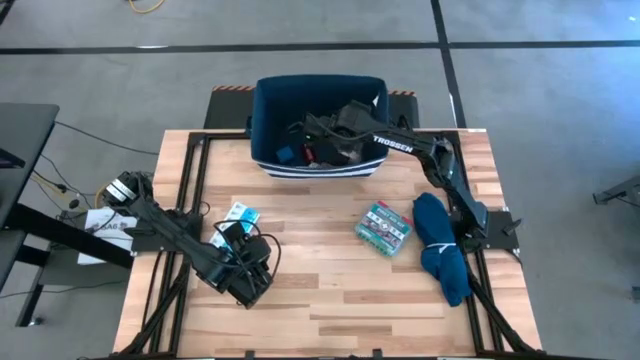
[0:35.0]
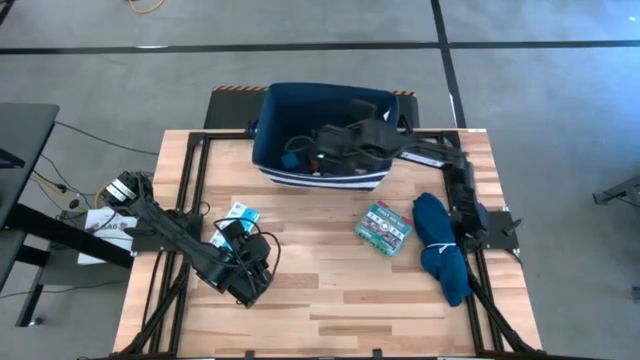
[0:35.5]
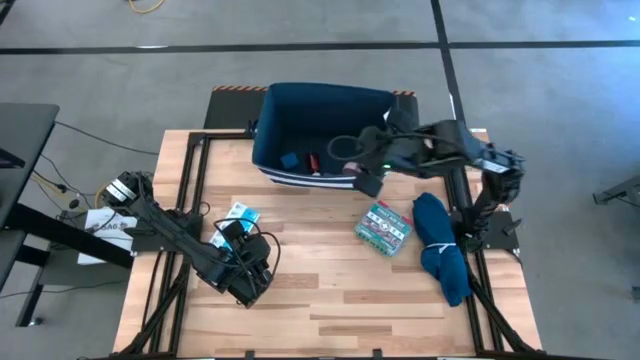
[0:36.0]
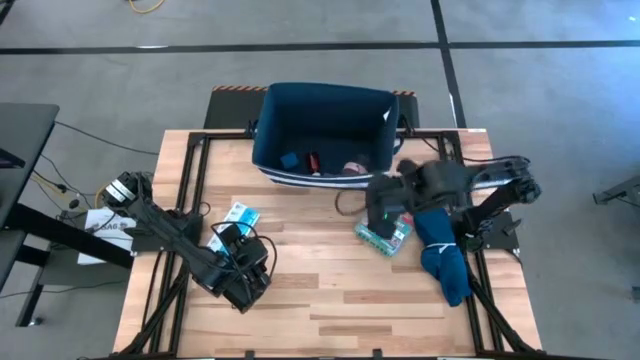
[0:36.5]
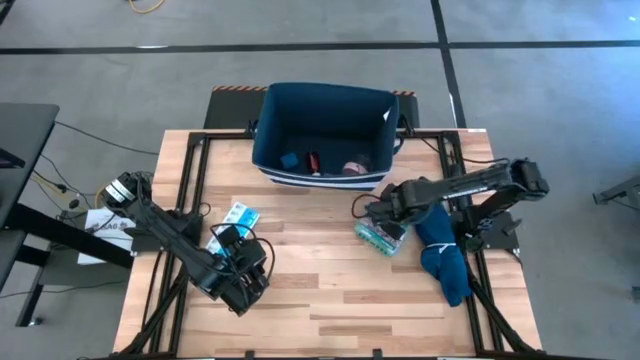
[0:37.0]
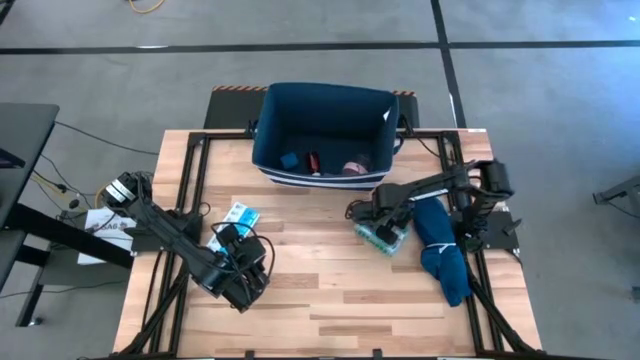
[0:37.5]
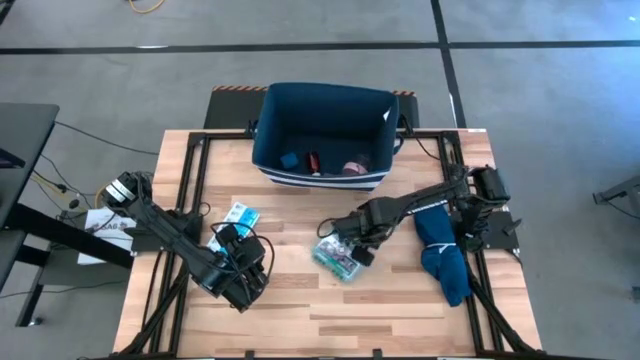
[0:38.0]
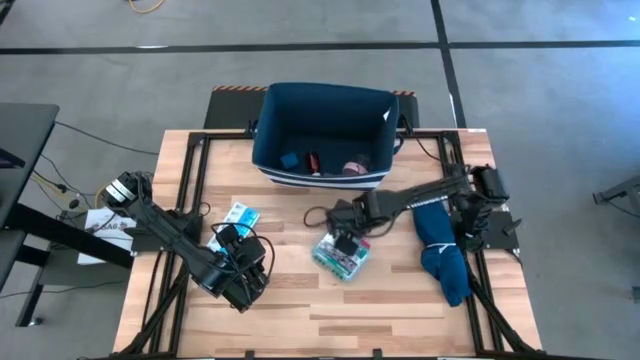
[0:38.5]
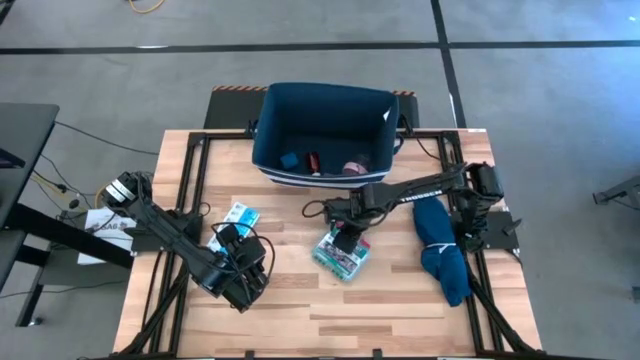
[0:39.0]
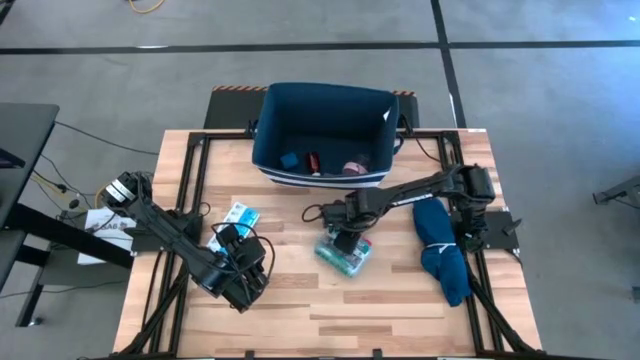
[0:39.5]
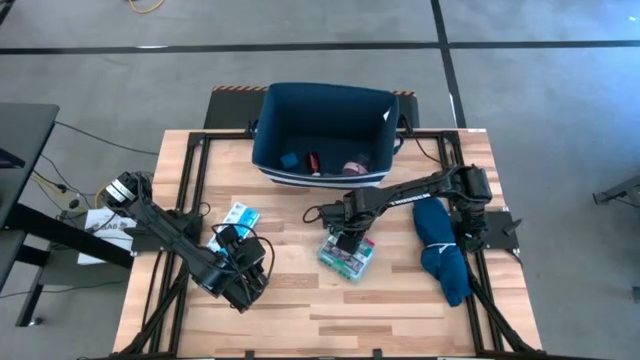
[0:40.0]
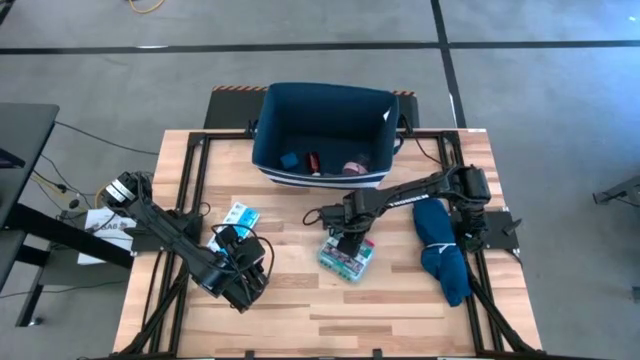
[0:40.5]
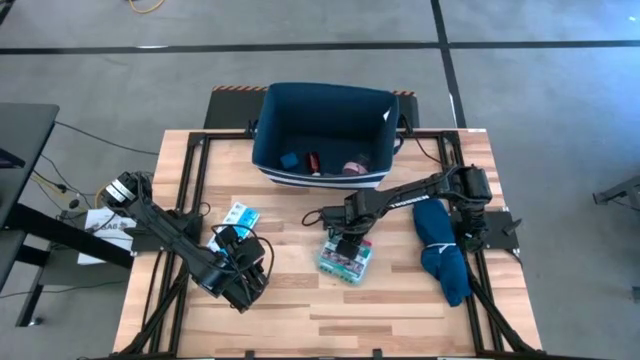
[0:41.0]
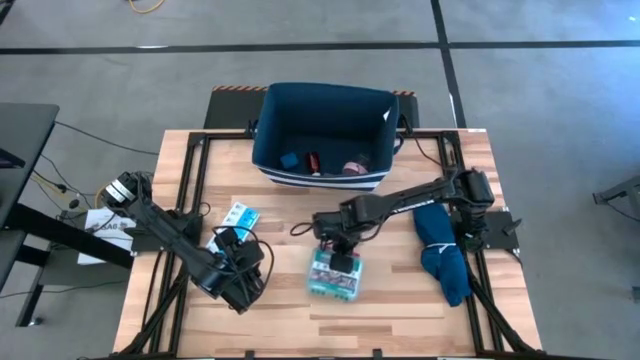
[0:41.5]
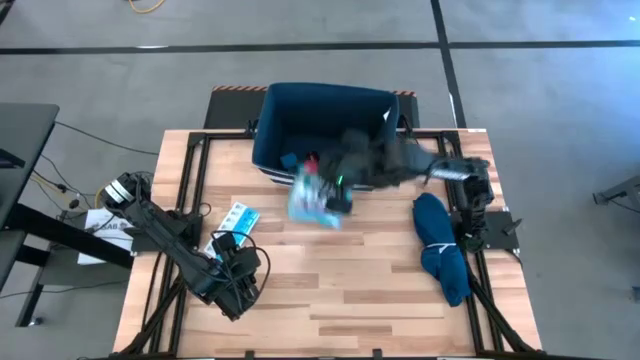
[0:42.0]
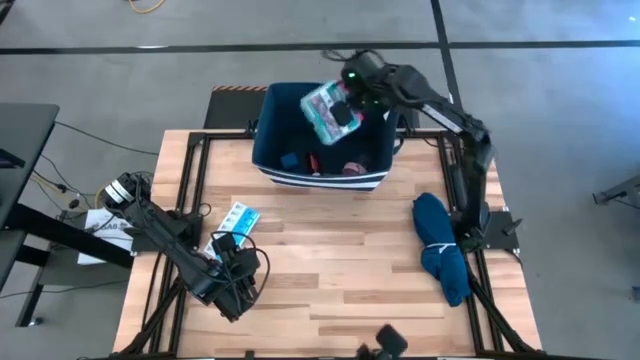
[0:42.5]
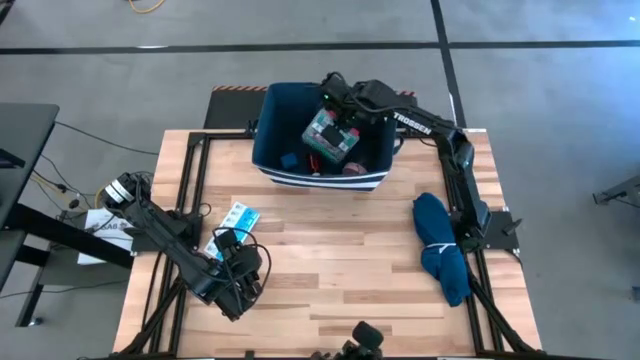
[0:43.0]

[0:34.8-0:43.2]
Task: Pick & place medical supplies in basket/bin
Put the green first aid kit in the blue bin

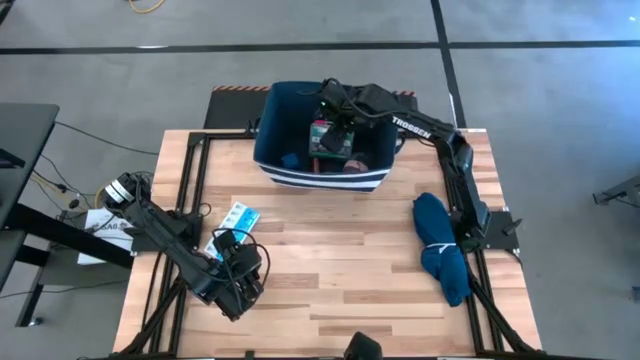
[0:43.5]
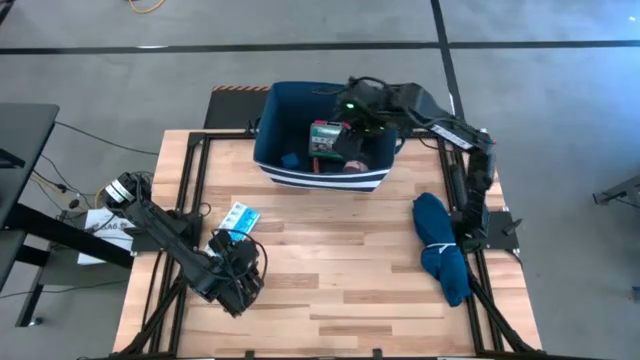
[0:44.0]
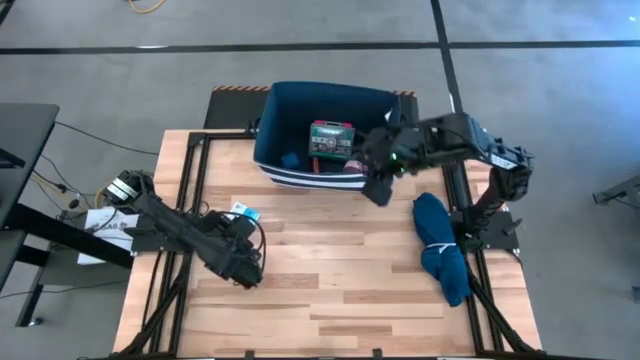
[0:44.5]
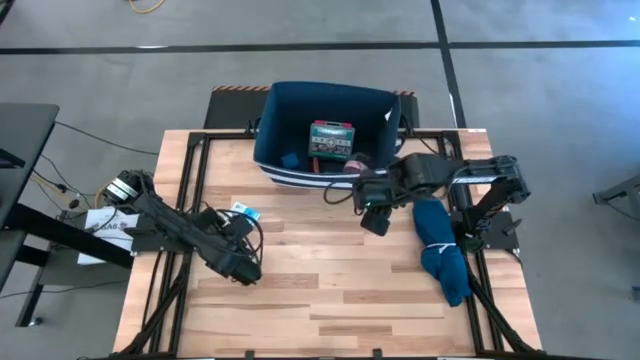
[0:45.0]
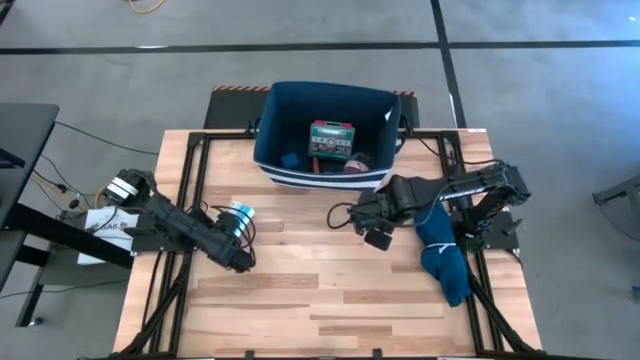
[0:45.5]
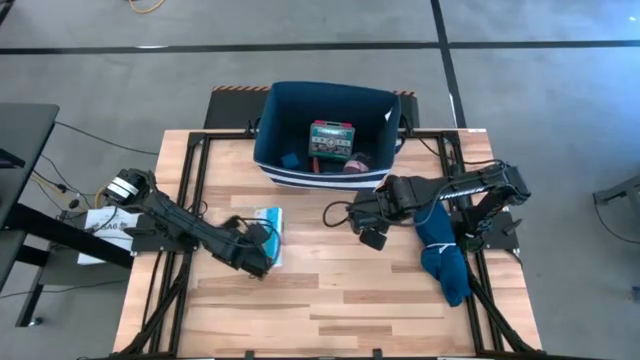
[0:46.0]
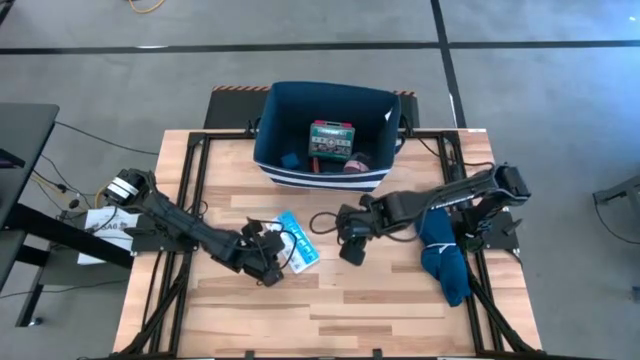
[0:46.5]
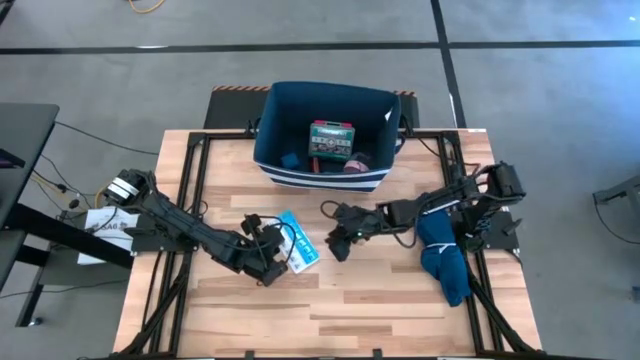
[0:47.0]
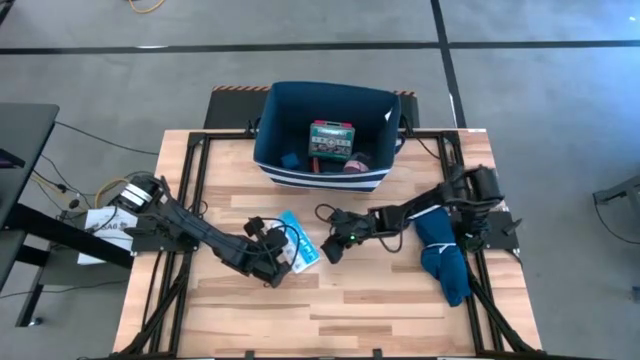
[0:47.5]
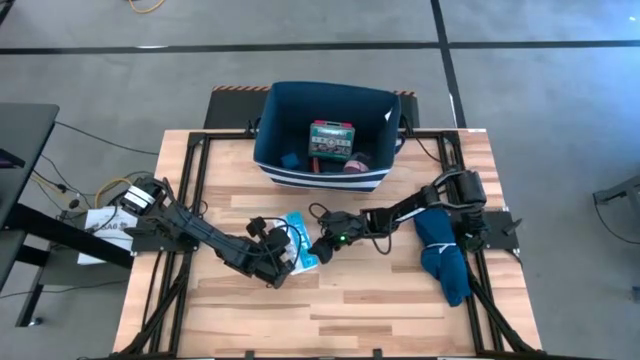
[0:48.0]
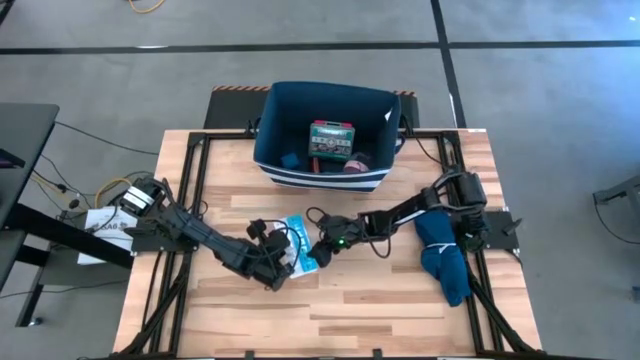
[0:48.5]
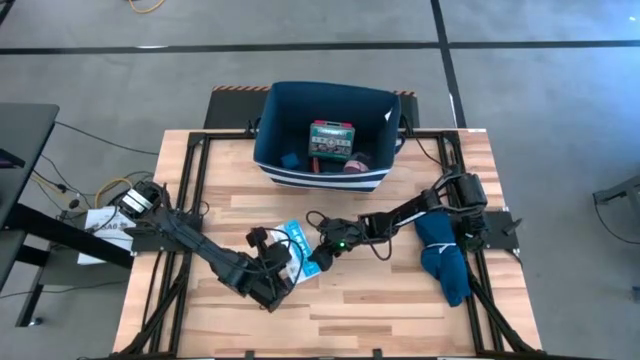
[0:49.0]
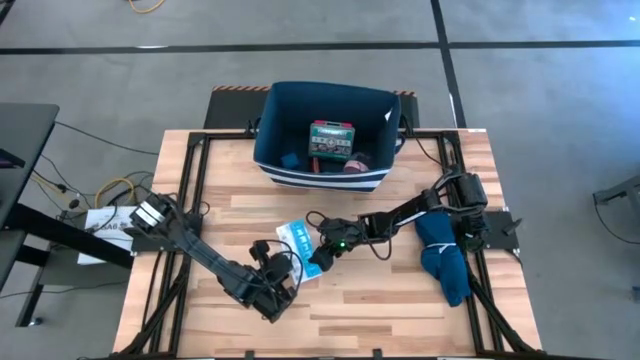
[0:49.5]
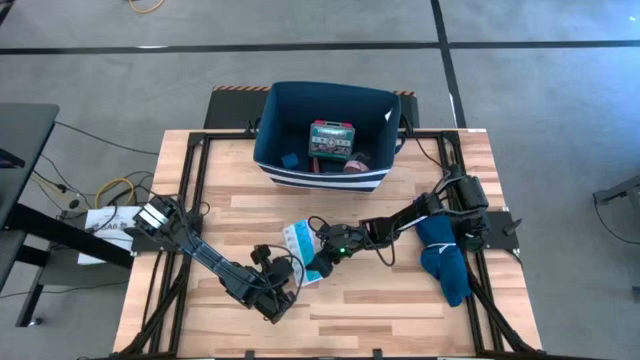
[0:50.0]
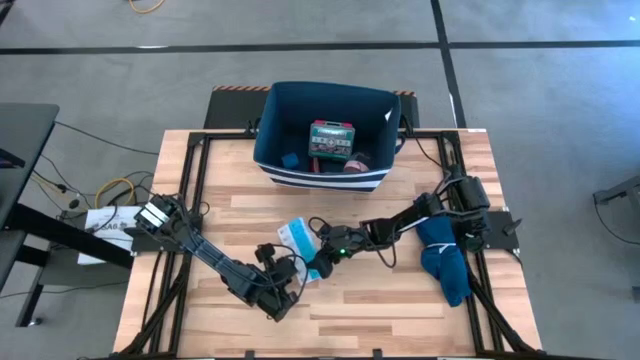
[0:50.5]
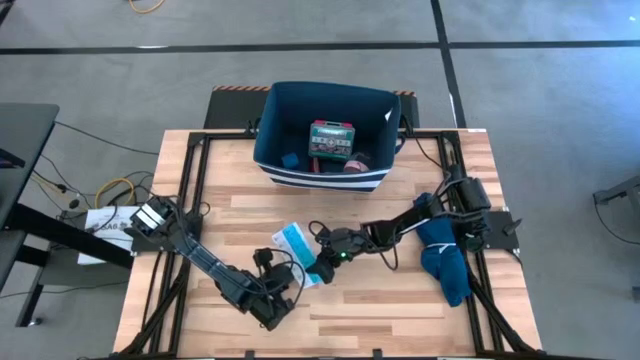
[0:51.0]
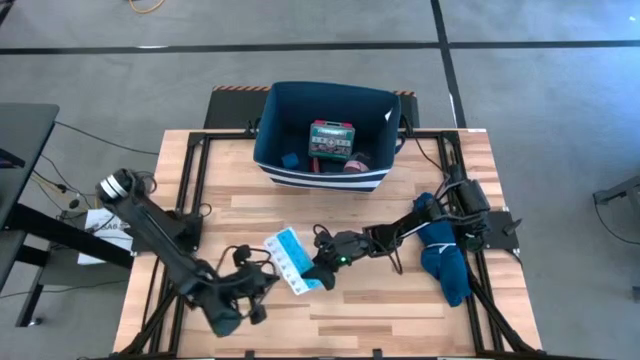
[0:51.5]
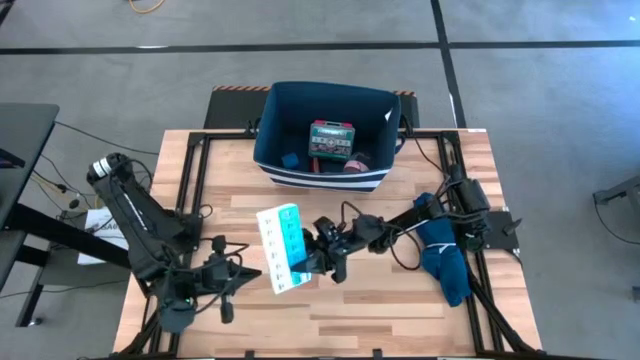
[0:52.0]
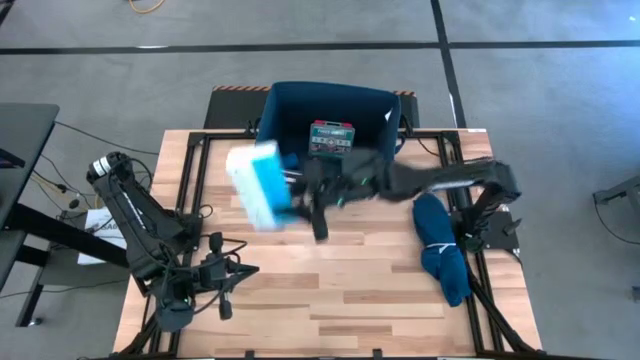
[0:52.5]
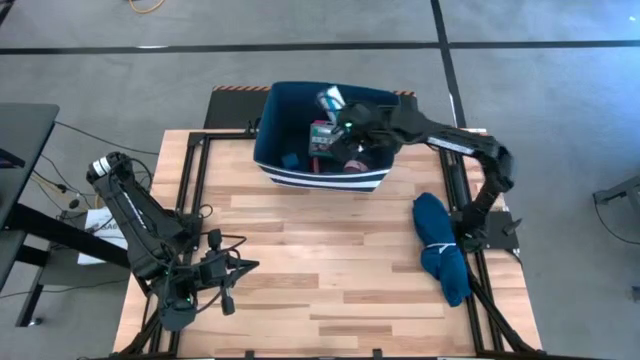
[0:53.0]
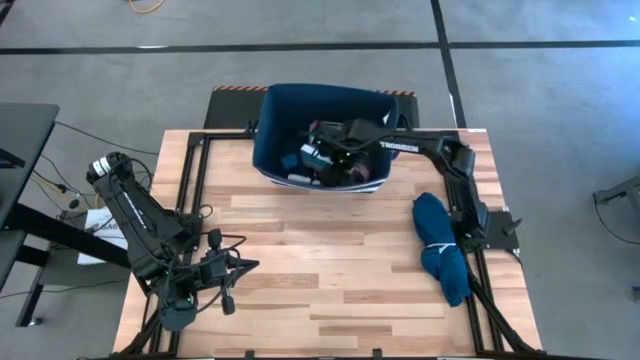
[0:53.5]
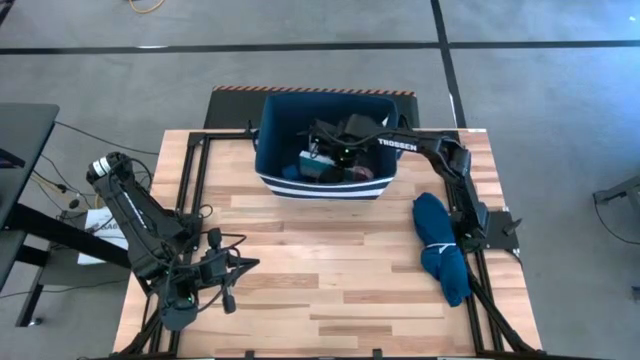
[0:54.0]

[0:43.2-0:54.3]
Put the blue medicine organizer in the blue bin
